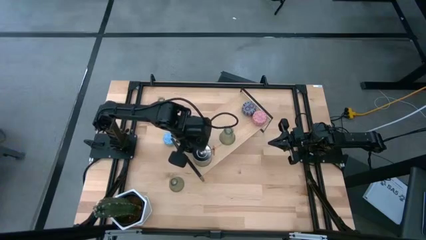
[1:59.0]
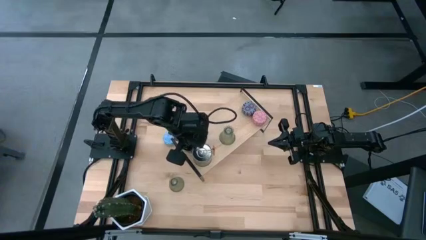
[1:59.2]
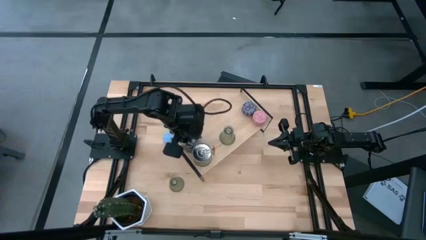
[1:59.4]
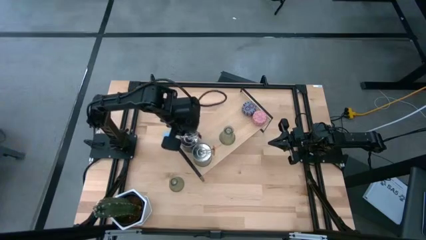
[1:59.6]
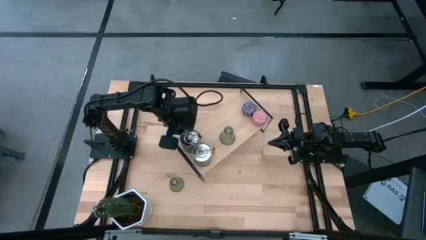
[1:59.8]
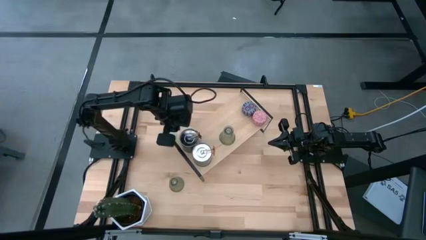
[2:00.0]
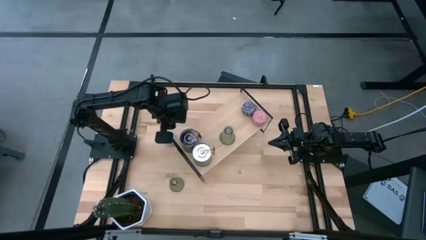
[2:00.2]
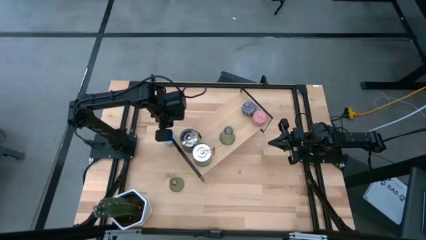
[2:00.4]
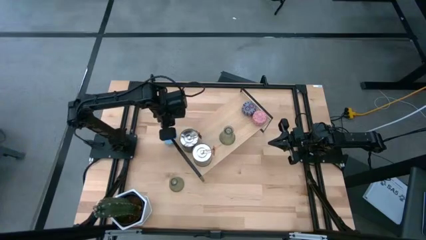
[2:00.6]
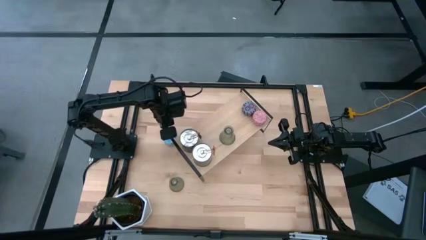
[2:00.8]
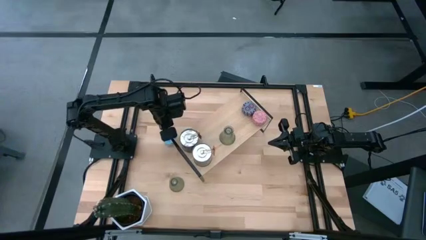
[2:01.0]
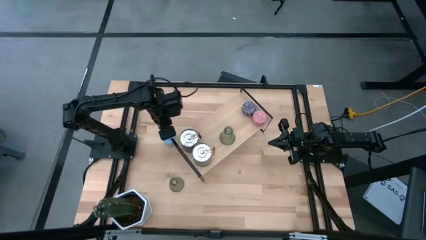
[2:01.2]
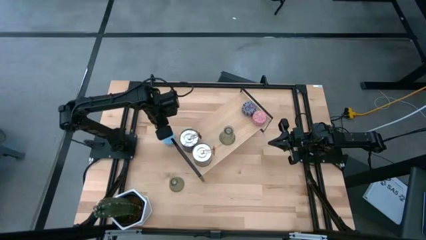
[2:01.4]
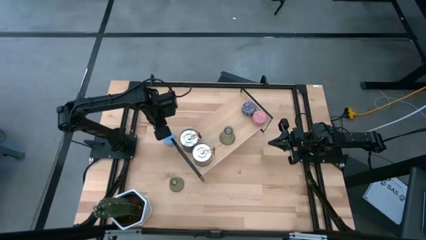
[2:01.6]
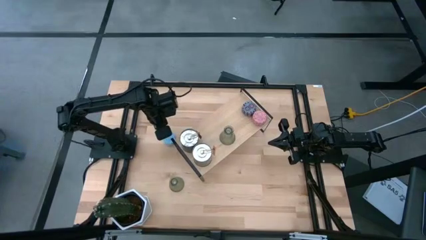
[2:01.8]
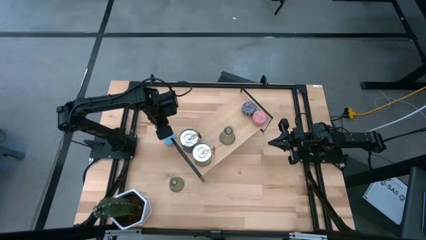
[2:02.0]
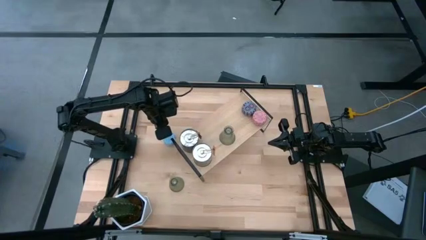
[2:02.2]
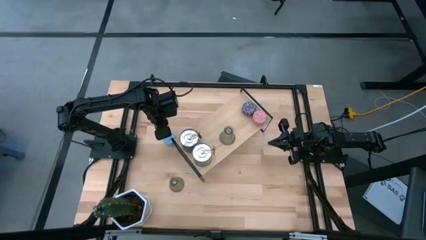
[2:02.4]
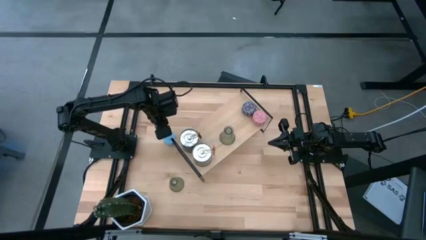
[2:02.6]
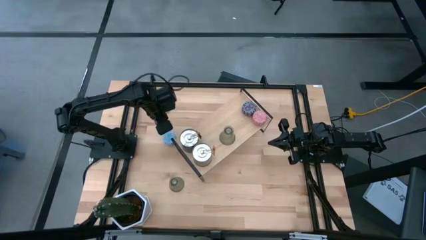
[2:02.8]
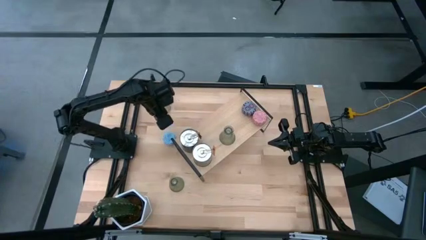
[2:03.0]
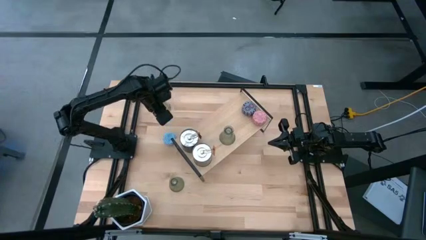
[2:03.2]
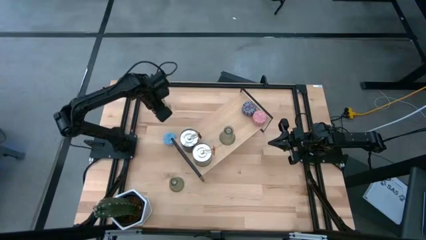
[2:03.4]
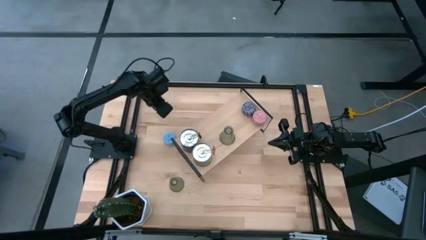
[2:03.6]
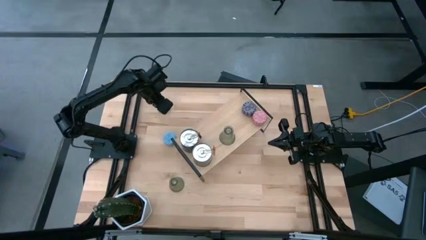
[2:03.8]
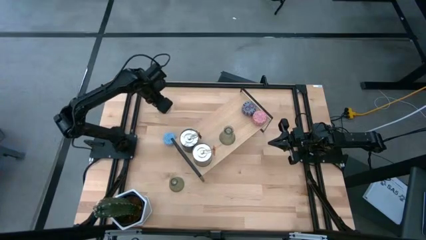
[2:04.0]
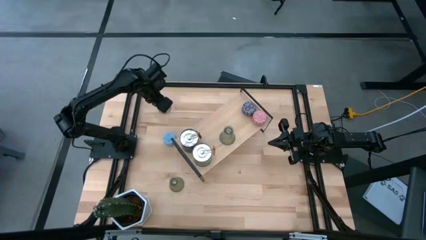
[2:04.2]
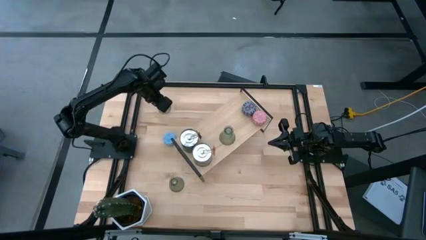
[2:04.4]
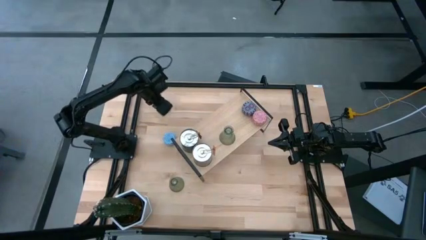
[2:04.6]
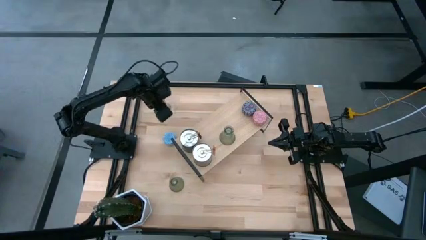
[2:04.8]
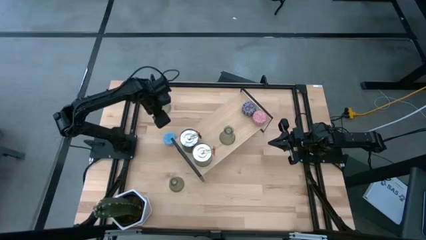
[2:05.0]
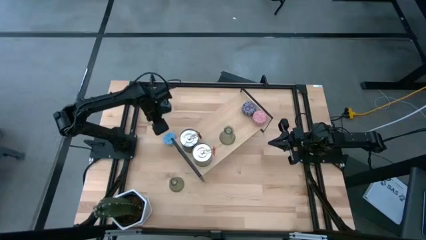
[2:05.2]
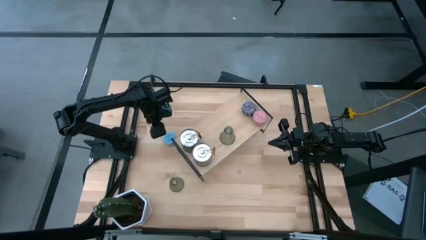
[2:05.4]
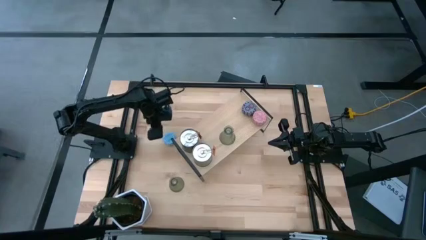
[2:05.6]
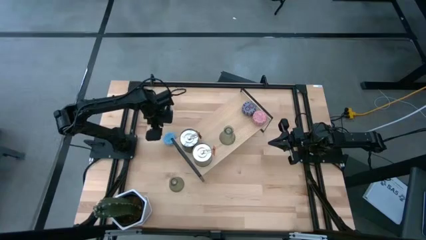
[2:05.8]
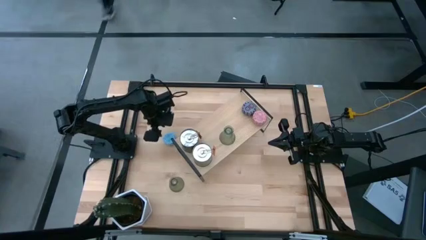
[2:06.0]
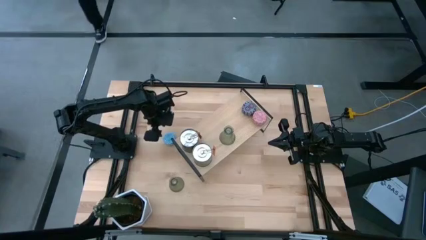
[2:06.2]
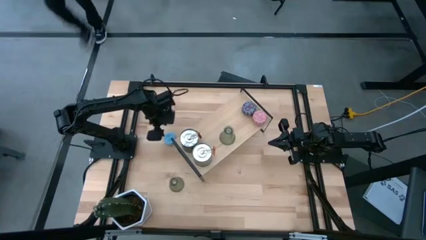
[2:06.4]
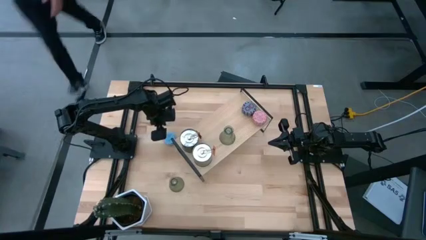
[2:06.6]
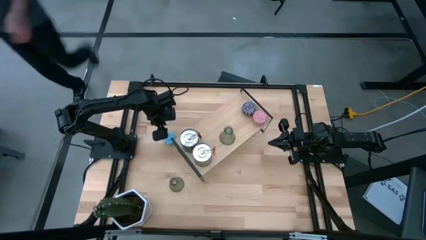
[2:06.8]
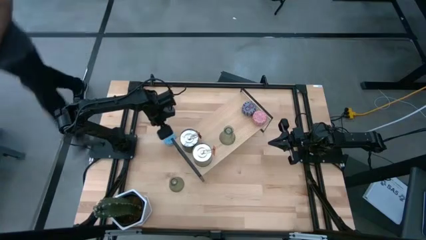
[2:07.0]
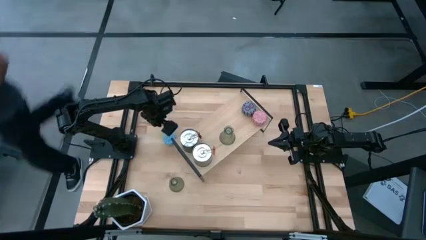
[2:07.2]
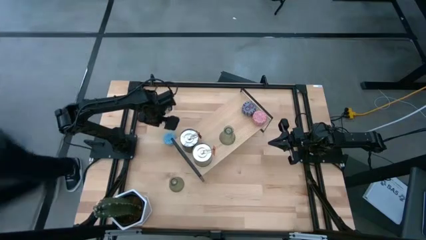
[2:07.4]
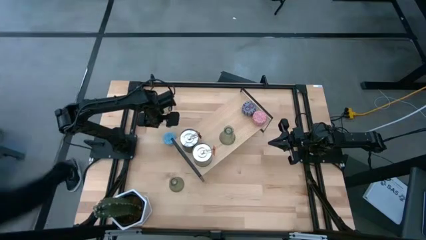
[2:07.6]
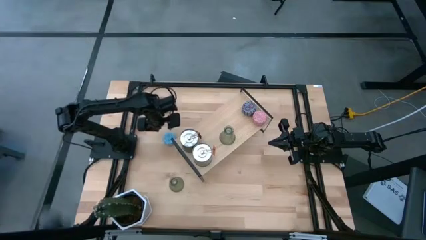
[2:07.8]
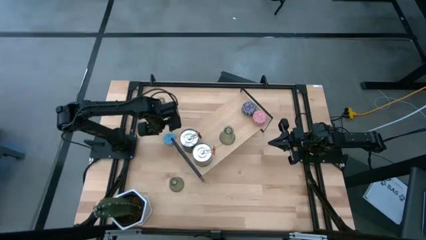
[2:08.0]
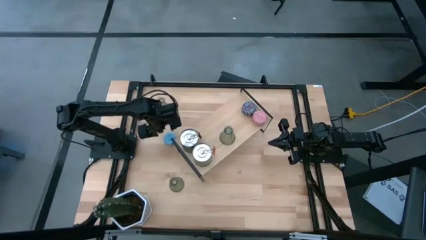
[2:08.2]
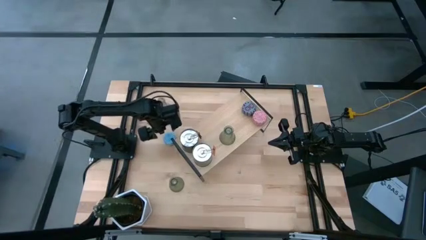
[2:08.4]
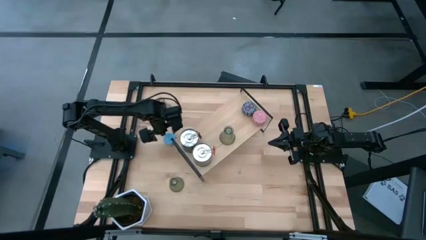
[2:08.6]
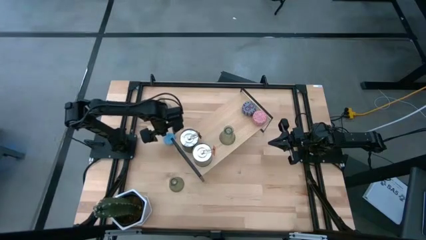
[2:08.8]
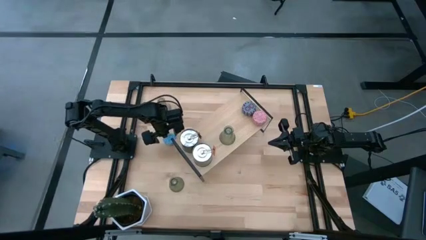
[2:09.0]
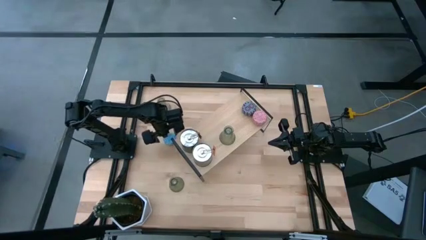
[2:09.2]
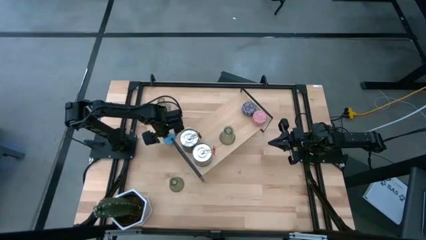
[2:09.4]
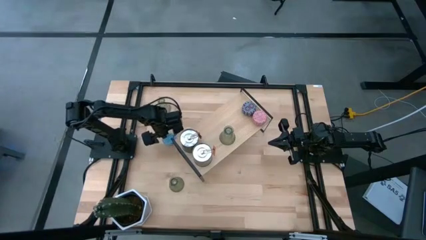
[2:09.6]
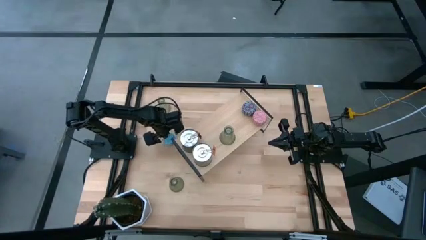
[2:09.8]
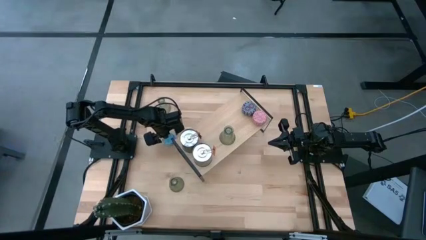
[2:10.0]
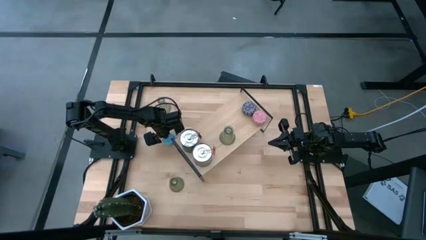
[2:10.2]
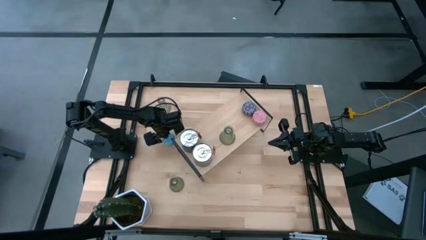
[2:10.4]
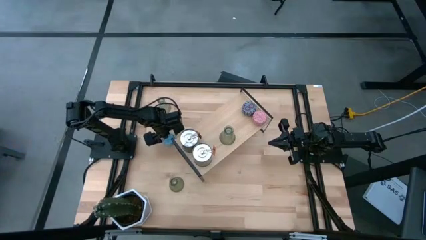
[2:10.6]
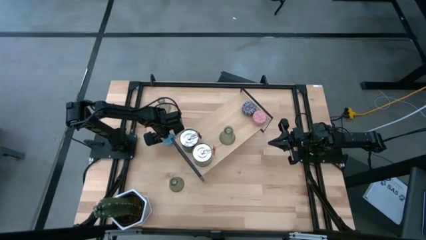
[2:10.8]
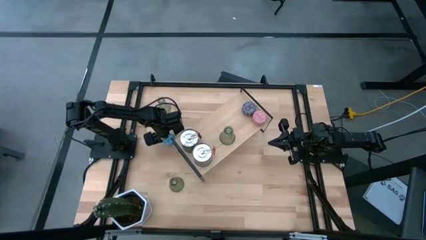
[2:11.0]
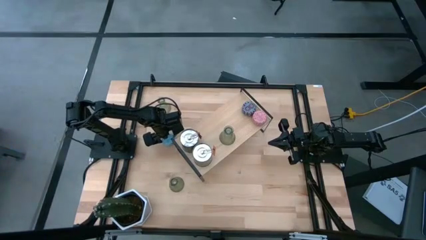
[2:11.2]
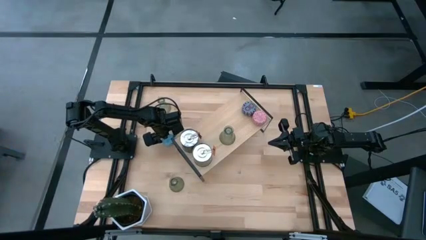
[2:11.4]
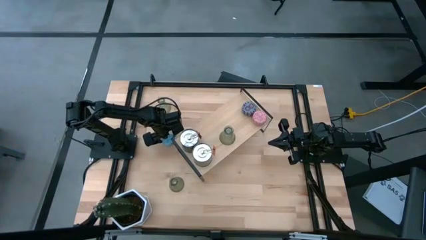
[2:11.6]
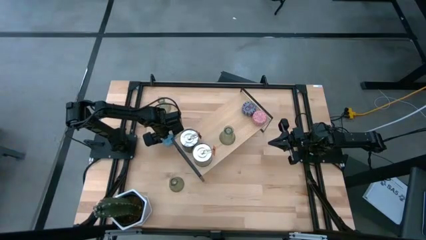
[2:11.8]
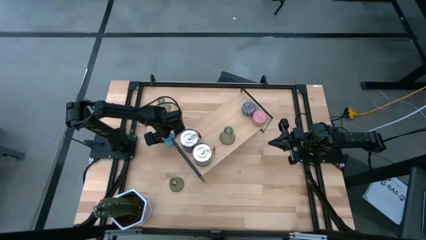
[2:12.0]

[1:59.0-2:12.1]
Task: Pick & Place candle stick holders
Put the blue patterned scented candle on the shelf

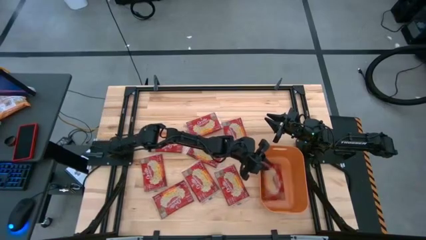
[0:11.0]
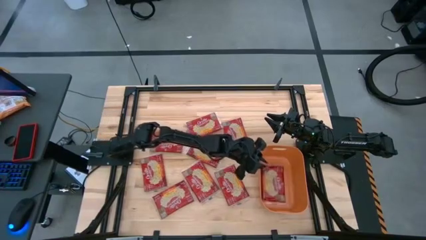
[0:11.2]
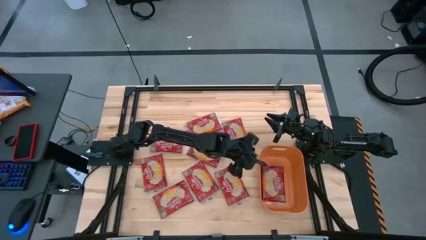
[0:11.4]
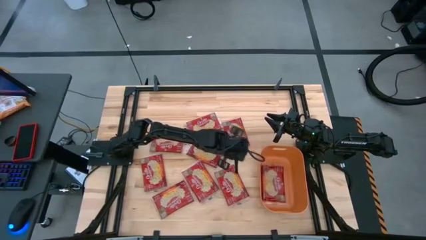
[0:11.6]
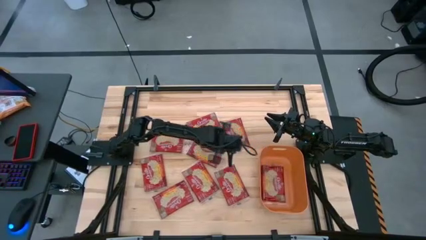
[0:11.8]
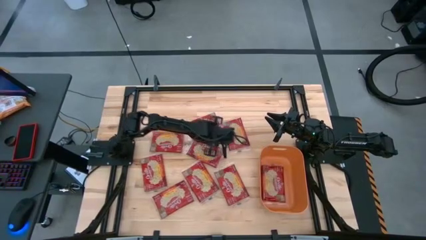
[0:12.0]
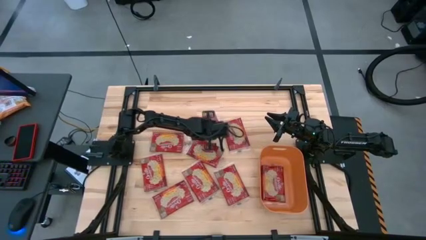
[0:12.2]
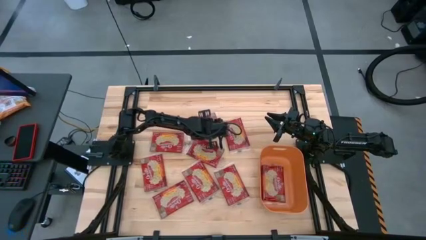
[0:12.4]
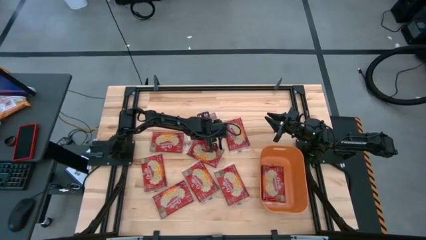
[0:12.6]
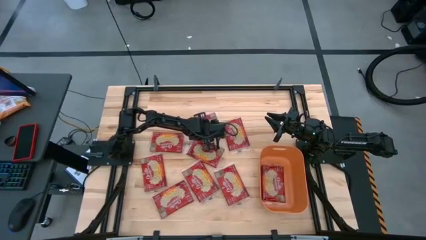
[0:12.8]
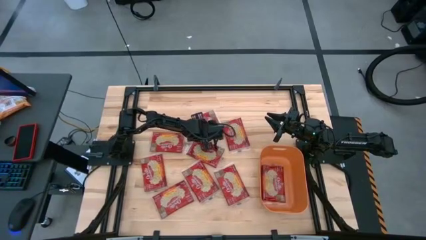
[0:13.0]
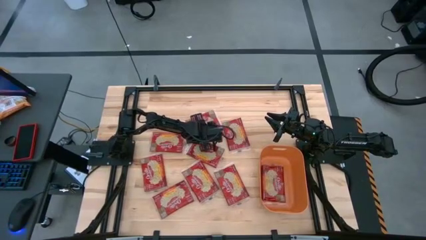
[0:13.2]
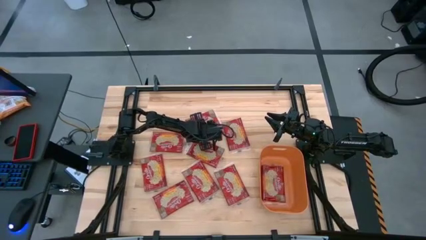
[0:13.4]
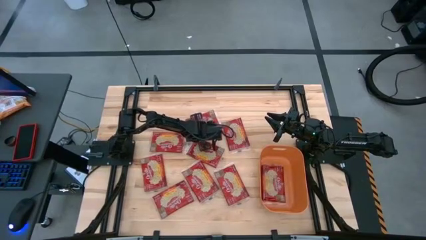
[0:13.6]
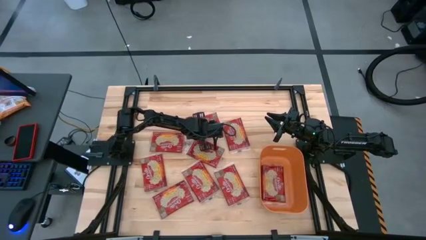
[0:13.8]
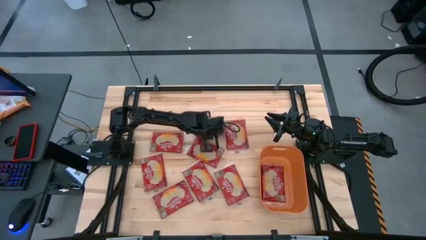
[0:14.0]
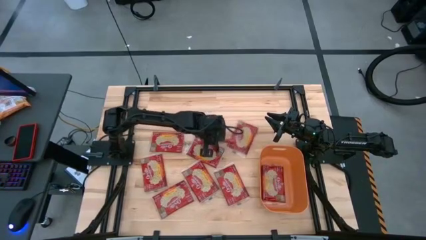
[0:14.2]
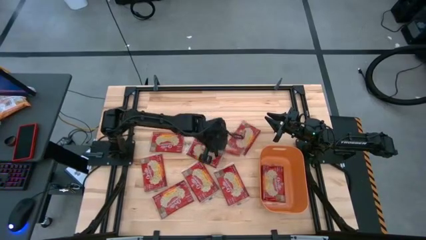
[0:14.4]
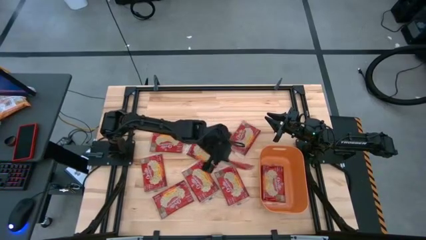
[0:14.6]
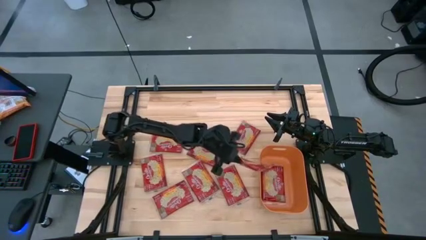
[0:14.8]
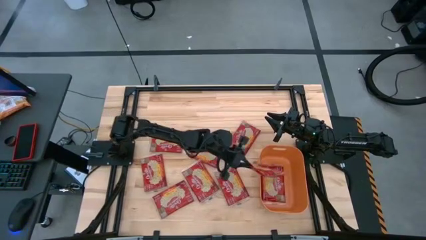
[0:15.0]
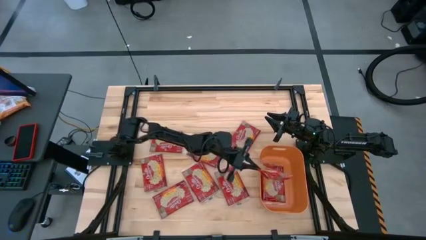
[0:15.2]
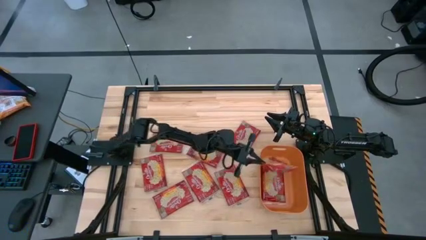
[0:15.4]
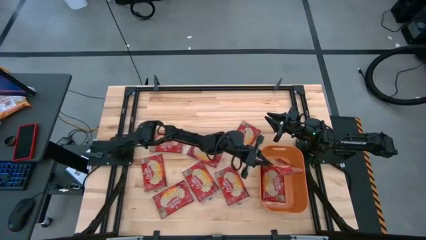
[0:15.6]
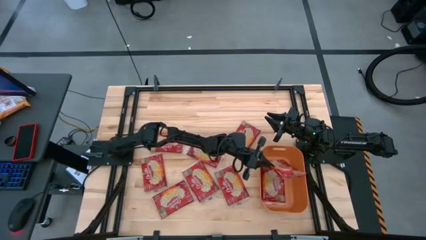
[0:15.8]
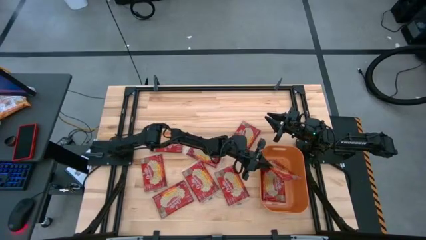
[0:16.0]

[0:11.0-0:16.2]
Task: Sort popcorn bags into baskets
Put the red popcorn bag into the orange bin
